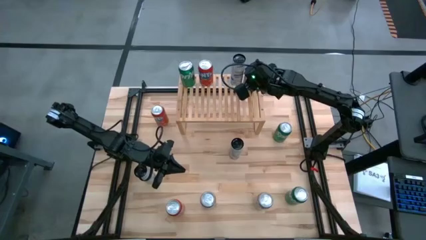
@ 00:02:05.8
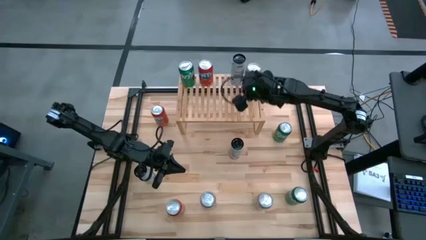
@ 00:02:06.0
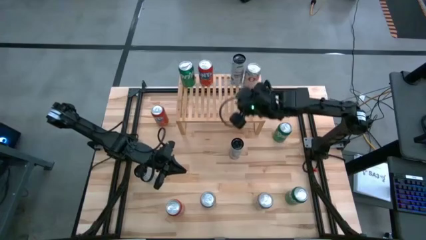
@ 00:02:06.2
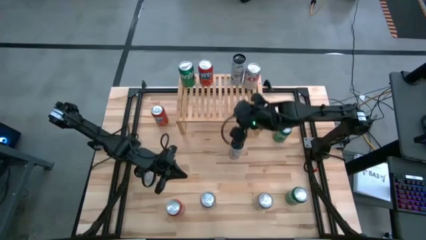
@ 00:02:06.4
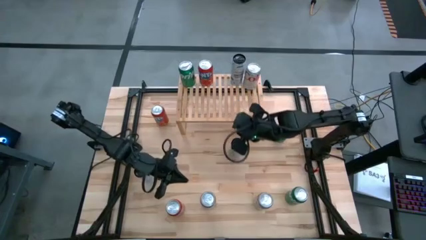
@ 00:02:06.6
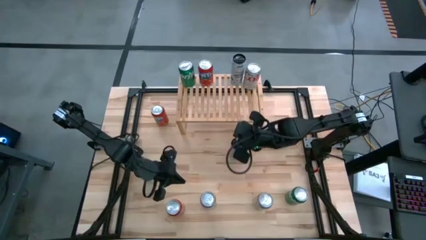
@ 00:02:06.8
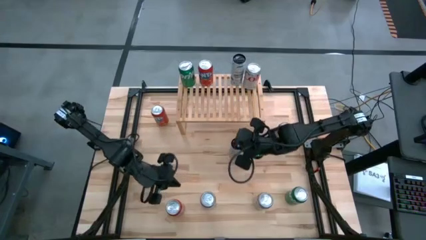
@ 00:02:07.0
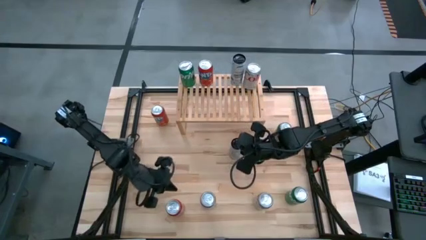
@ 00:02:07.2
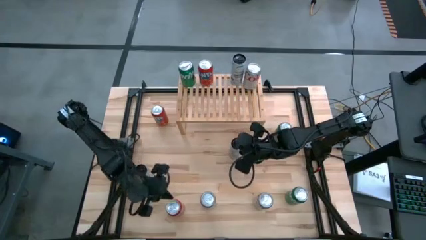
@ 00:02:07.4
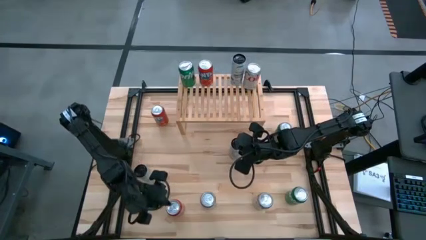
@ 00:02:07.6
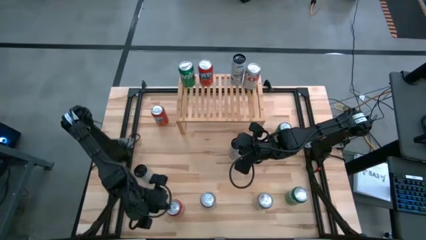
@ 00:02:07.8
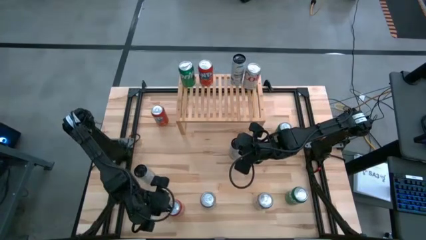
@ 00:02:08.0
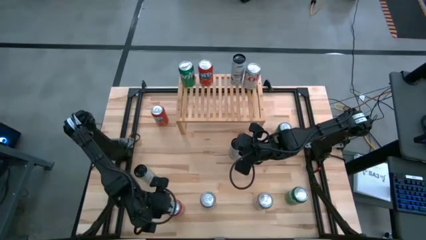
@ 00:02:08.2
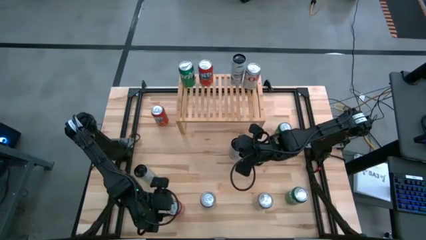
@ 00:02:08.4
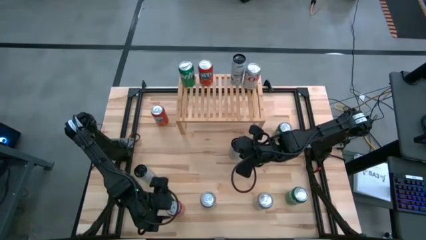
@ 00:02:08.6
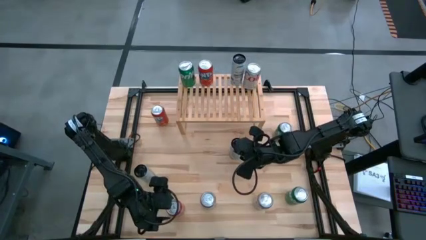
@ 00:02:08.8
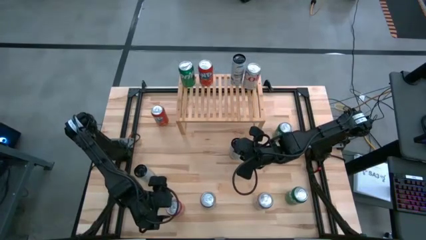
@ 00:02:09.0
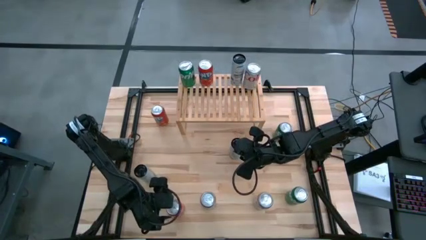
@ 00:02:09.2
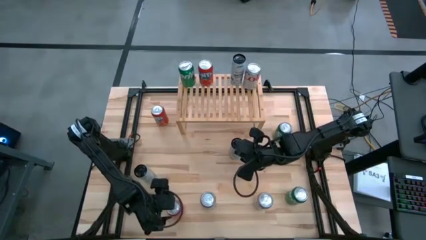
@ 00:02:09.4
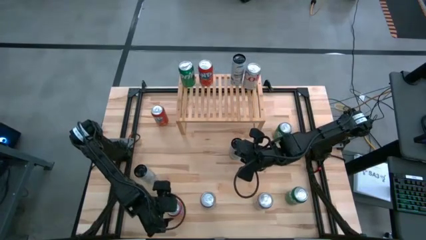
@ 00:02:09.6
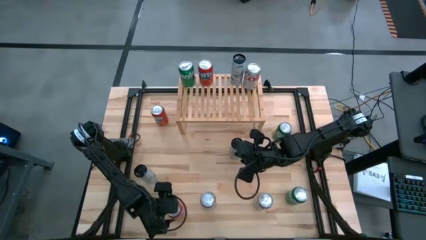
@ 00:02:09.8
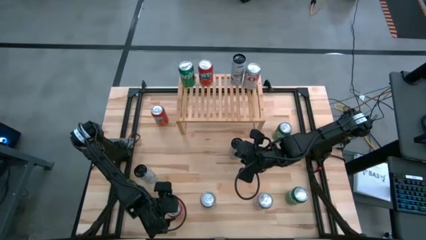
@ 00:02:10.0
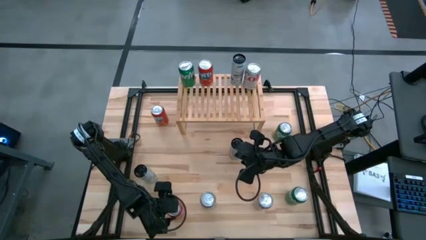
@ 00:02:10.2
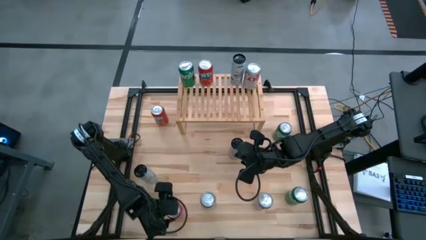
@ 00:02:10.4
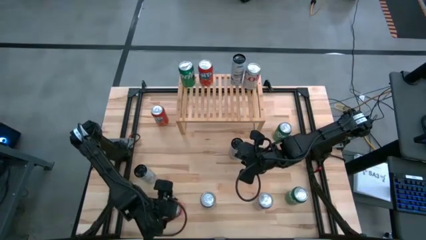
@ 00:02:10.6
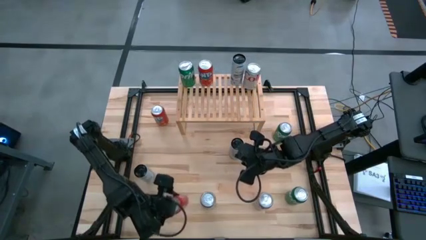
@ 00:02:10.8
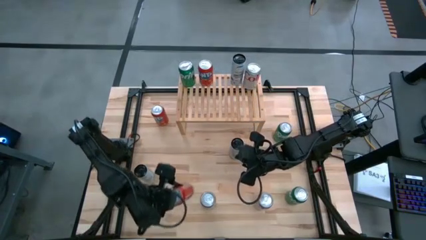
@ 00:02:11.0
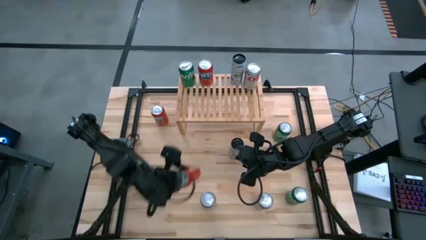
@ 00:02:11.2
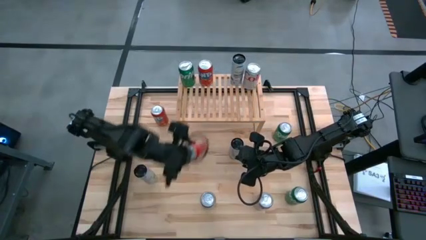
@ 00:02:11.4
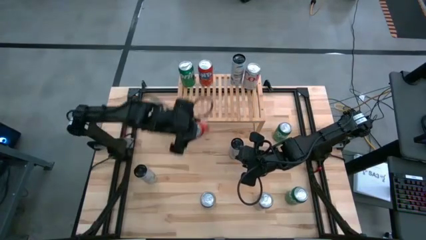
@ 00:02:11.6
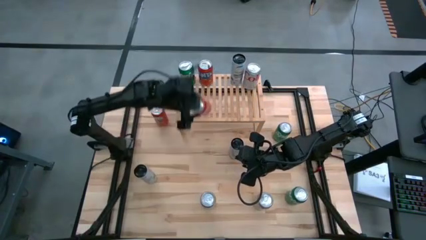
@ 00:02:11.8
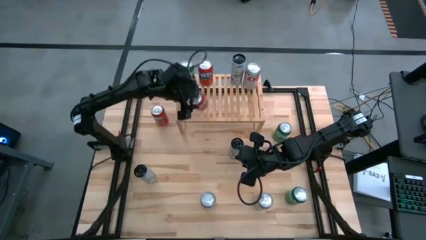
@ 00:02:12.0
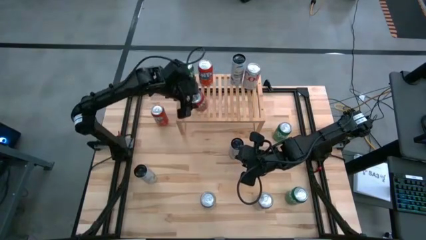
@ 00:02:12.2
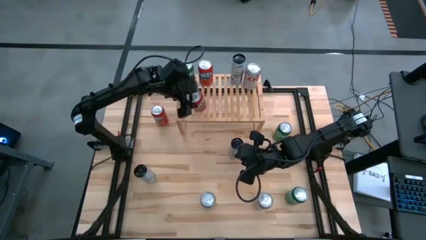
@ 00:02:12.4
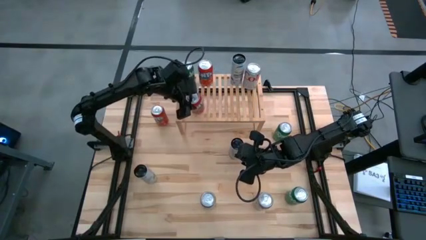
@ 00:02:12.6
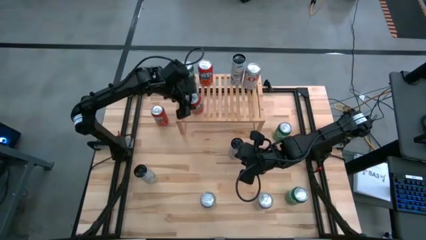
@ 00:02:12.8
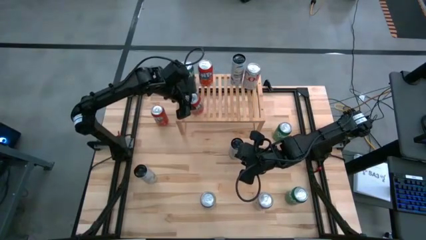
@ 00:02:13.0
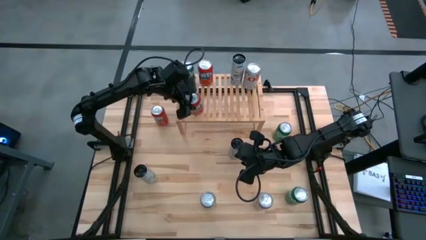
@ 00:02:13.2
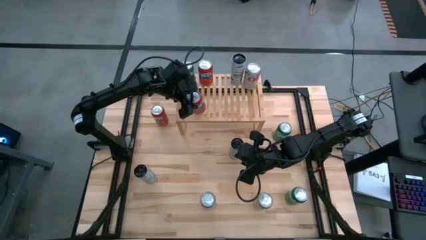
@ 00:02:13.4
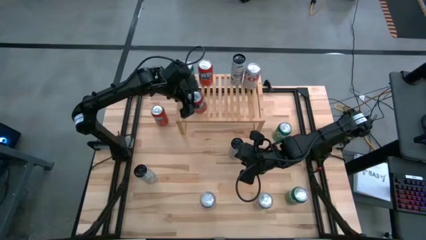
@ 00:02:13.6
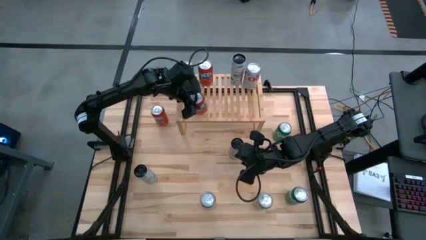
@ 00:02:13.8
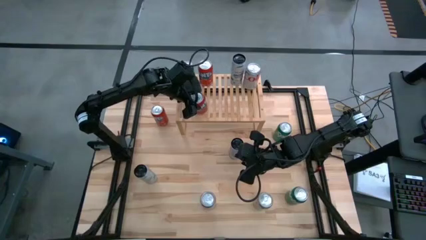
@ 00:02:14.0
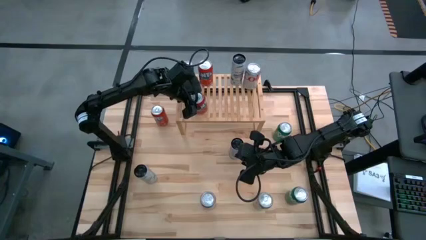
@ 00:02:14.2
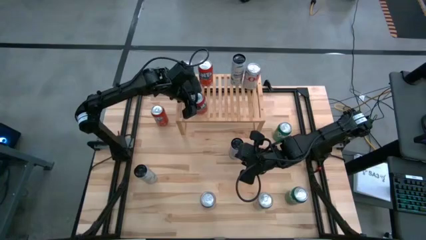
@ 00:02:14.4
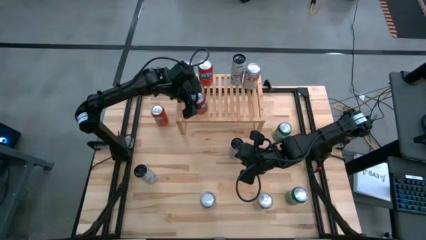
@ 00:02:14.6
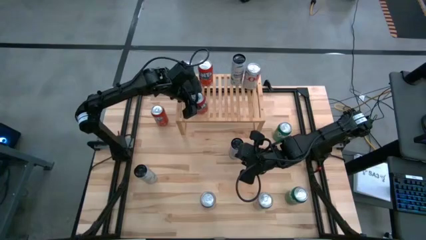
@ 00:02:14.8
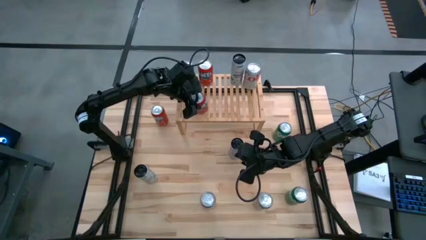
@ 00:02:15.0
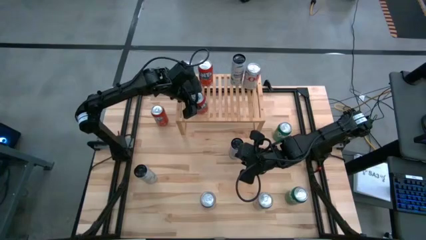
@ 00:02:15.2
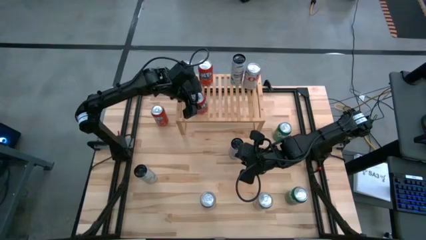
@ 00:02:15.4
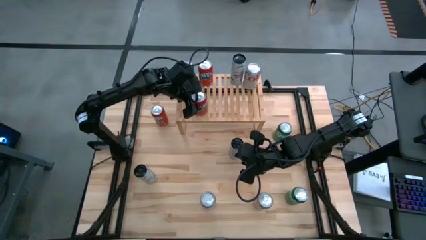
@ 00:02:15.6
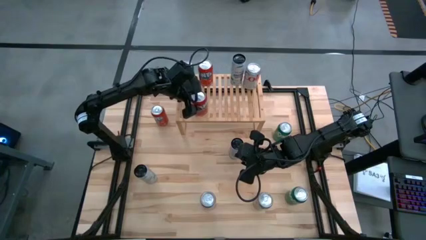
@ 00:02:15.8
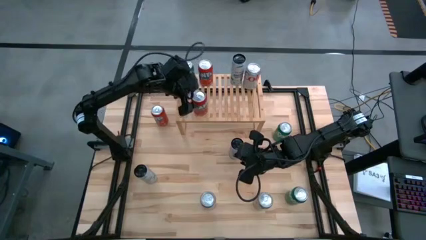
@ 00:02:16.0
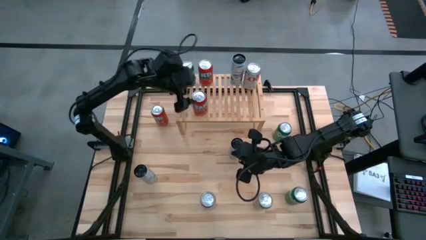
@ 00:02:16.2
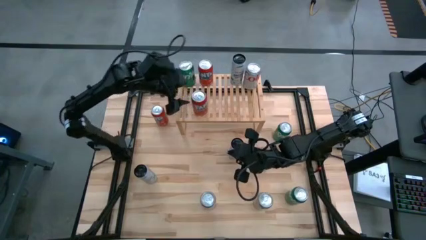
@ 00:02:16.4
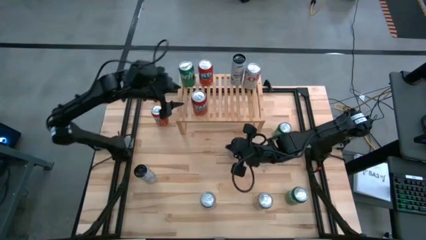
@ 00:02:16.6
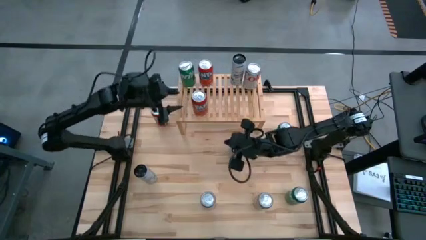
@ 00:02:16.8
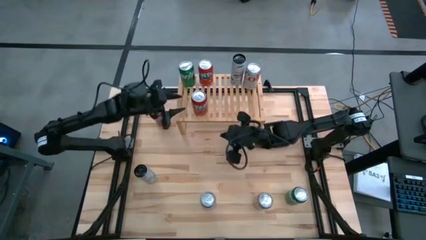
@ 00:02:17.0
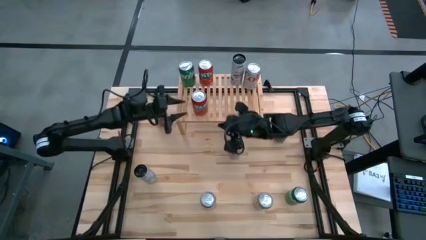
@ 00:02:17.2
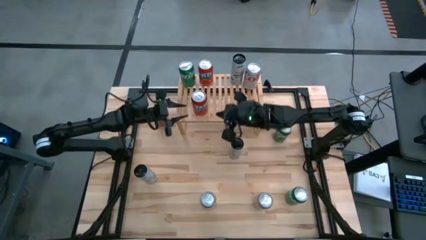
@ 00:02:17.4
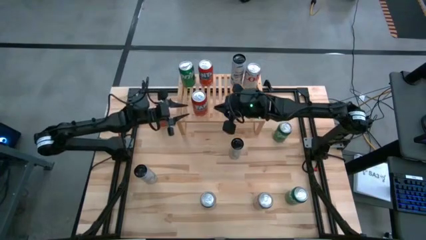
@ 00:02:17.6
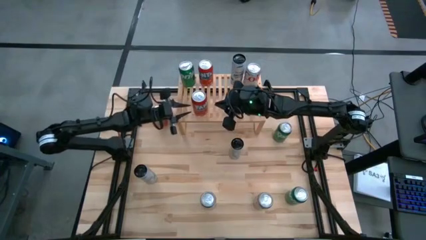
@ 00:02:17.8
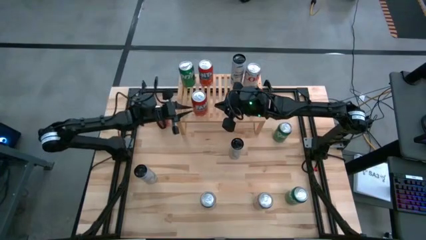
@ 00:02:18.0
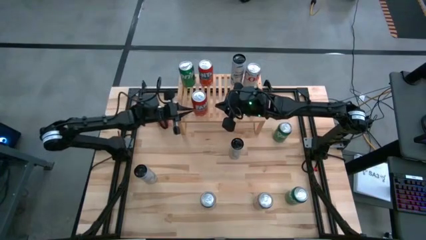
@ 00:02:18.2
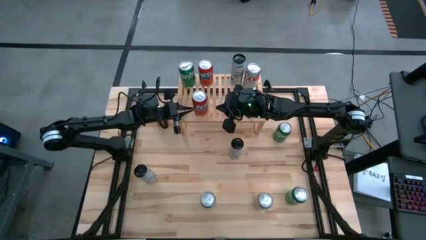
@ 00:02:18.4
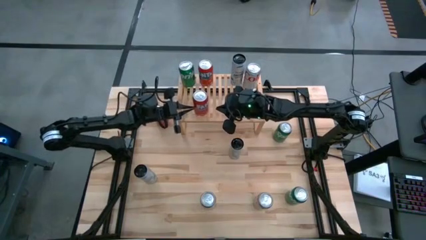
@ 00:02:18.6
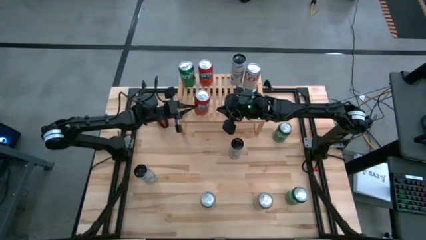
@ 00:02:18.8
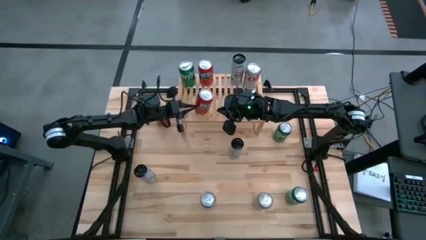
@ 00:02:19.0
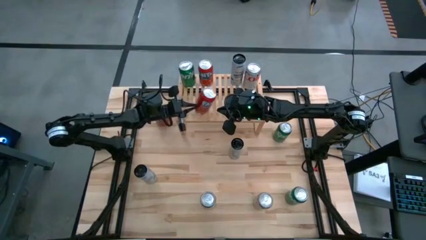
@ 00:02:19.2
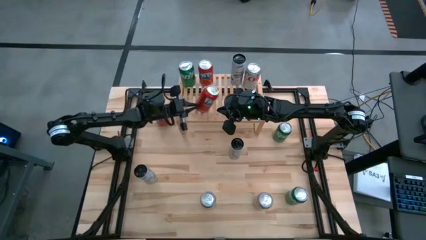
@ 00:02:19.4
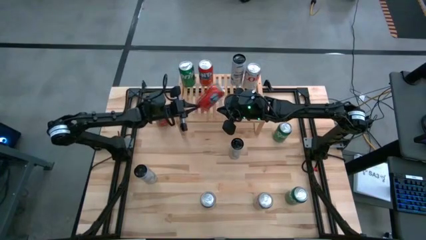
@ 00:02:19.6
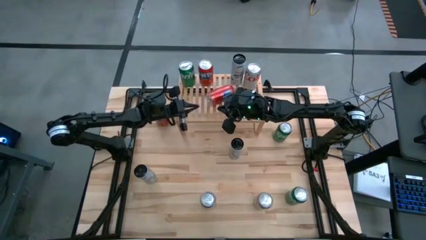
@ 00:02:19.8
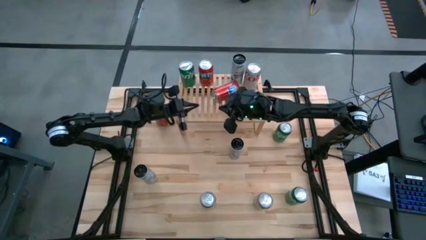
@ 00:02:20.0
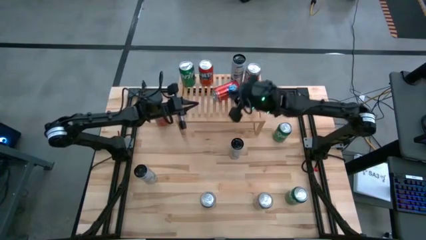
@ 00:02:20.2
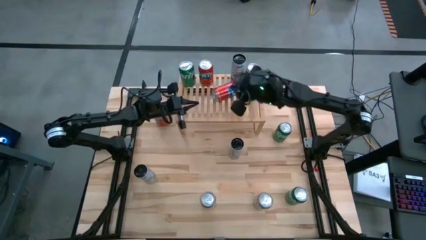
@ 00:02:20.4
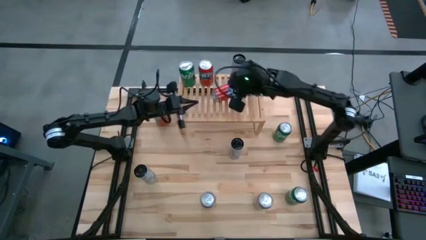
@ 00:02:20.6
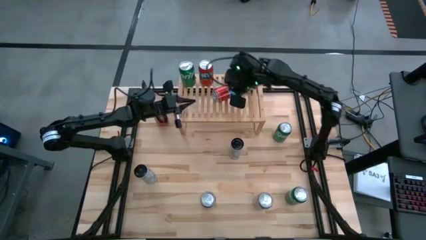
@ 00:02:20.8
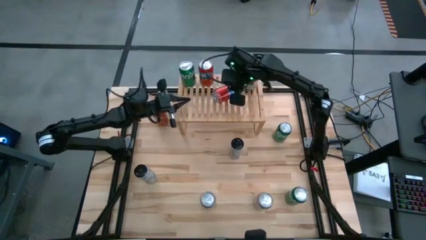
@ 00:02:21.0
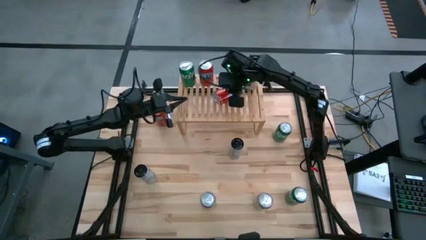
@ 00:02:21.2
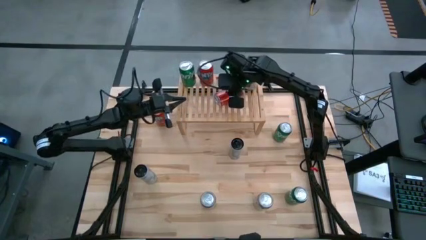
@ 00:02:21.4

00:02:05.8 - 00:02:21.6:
Task: Place canned beverage on shelf
Put the bottom red soda can aligned with the other red soda can on the shelf
